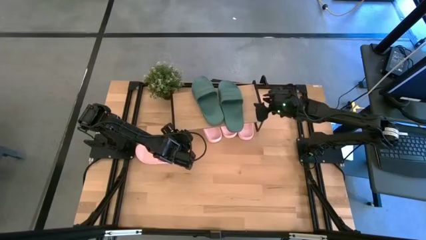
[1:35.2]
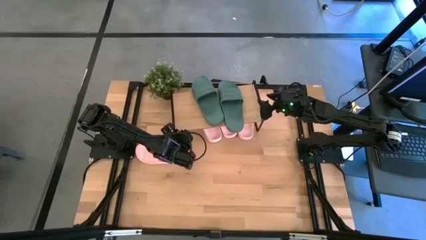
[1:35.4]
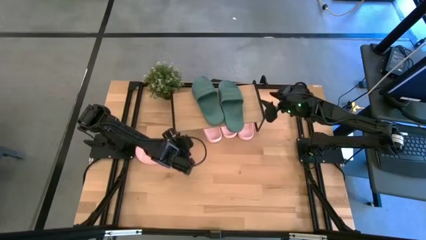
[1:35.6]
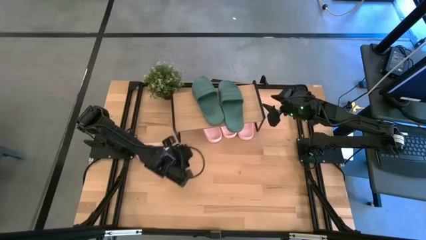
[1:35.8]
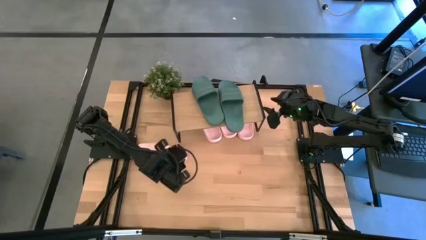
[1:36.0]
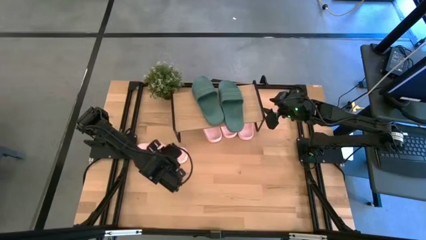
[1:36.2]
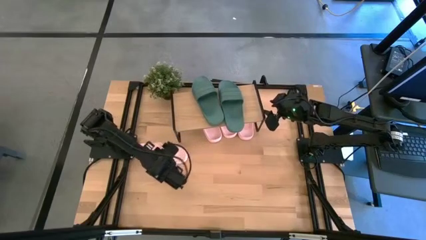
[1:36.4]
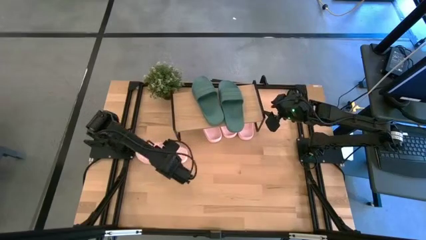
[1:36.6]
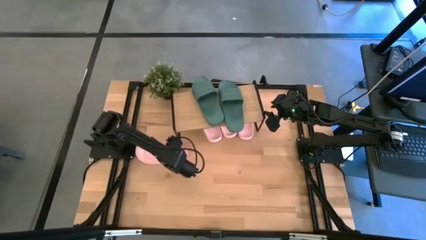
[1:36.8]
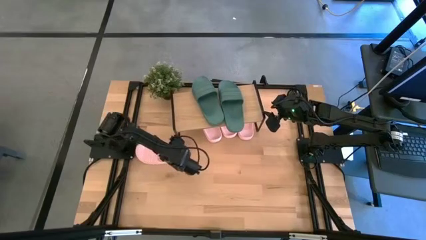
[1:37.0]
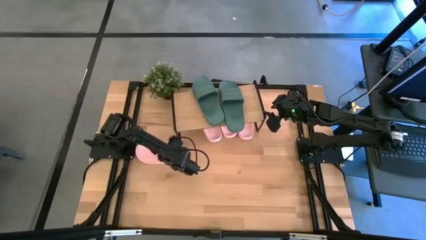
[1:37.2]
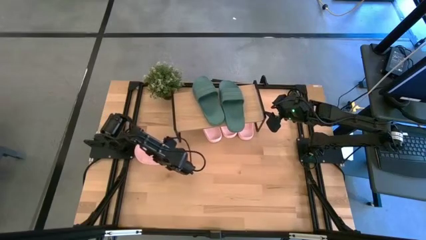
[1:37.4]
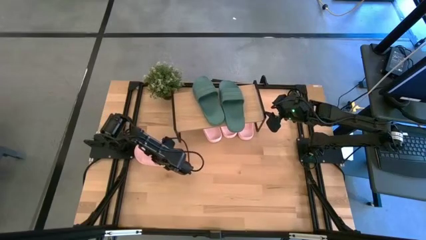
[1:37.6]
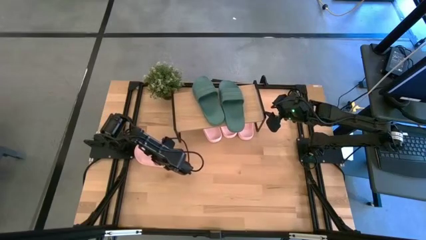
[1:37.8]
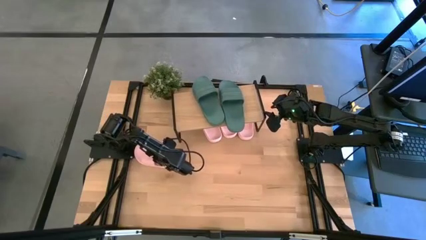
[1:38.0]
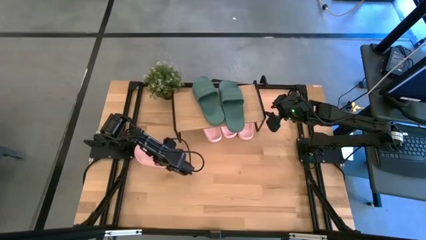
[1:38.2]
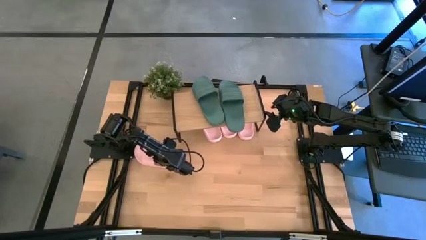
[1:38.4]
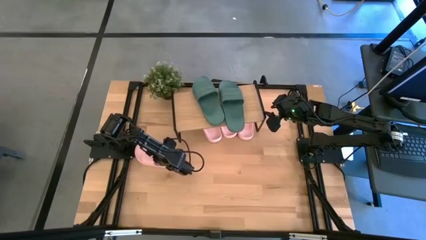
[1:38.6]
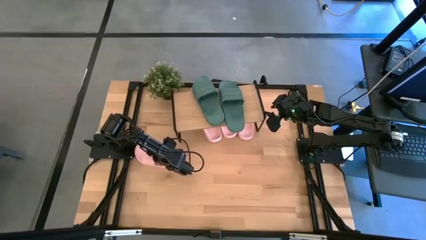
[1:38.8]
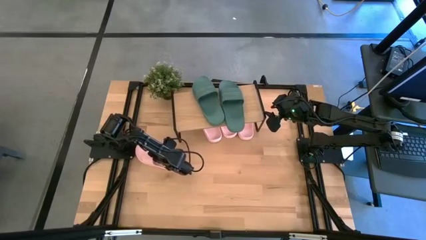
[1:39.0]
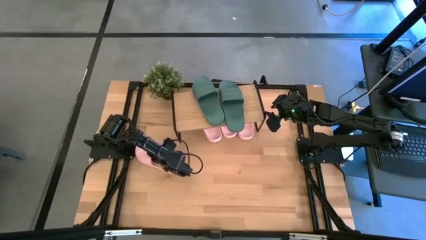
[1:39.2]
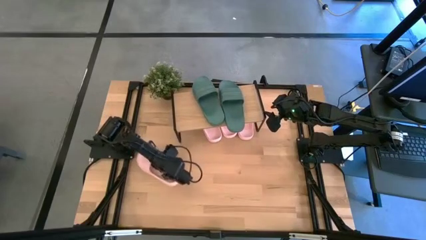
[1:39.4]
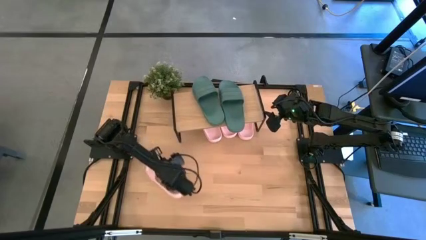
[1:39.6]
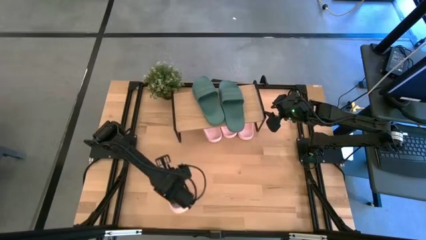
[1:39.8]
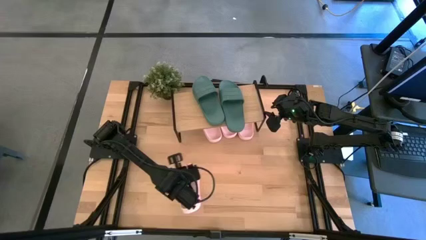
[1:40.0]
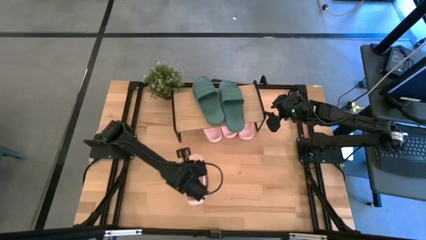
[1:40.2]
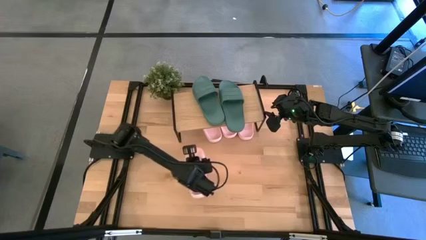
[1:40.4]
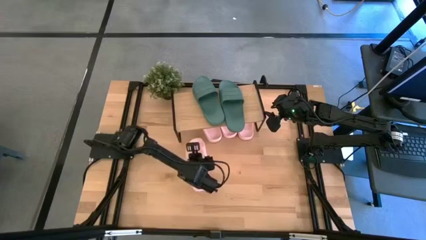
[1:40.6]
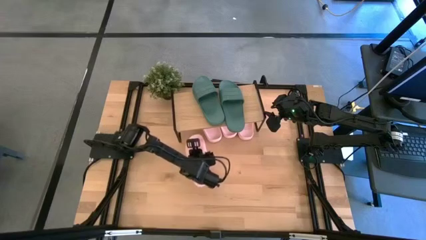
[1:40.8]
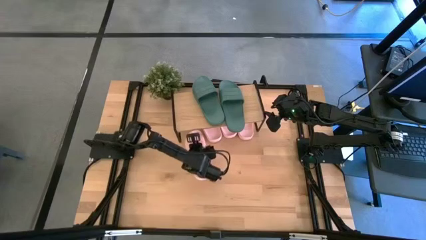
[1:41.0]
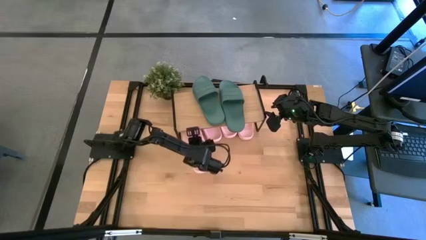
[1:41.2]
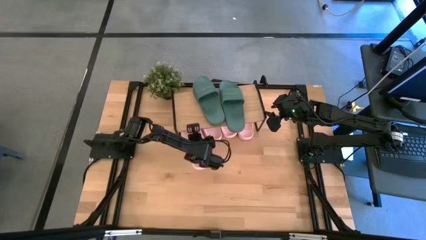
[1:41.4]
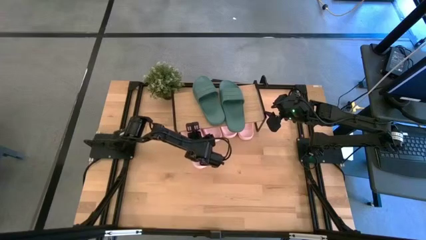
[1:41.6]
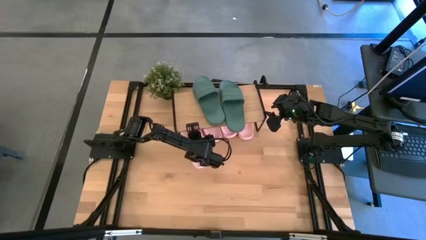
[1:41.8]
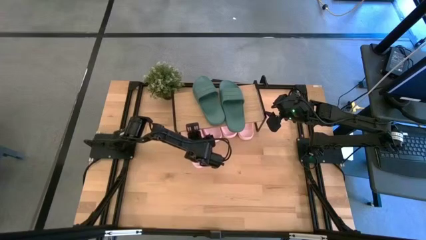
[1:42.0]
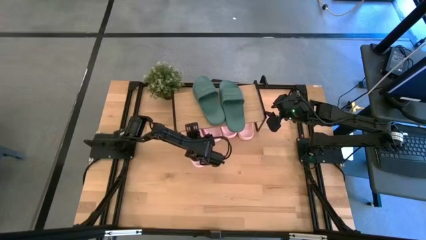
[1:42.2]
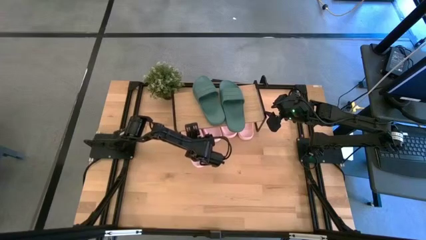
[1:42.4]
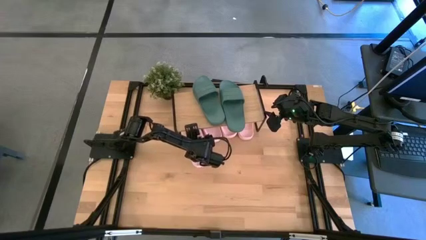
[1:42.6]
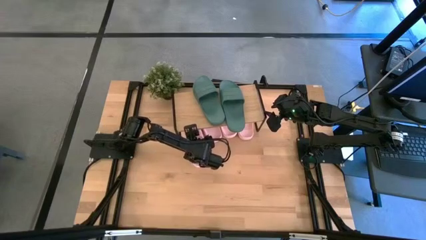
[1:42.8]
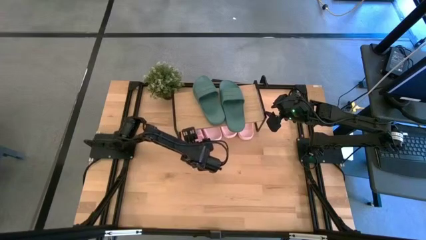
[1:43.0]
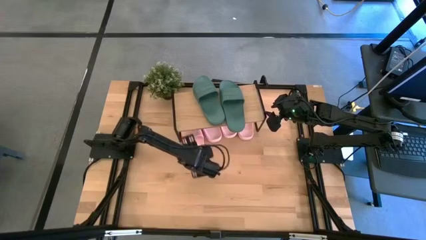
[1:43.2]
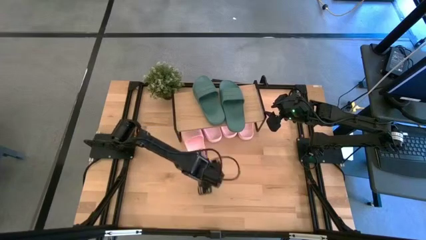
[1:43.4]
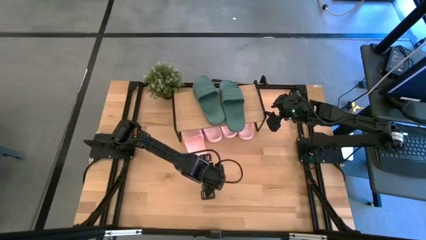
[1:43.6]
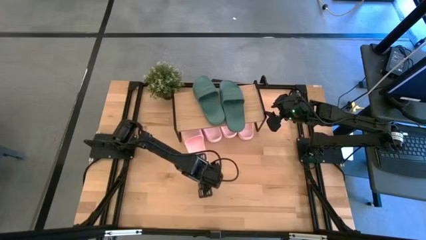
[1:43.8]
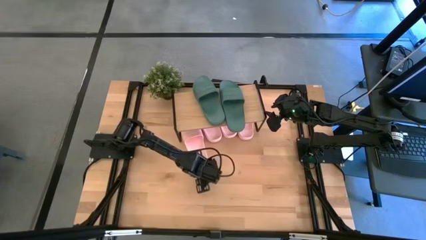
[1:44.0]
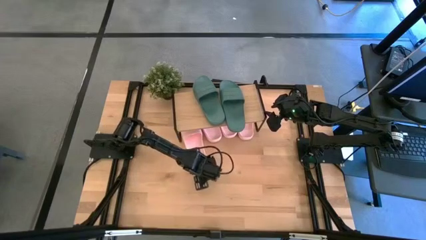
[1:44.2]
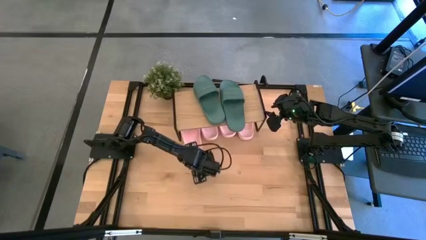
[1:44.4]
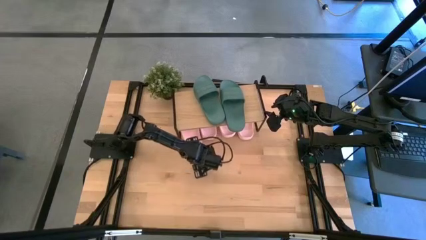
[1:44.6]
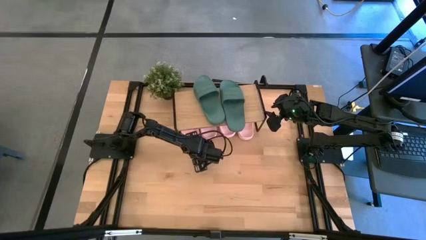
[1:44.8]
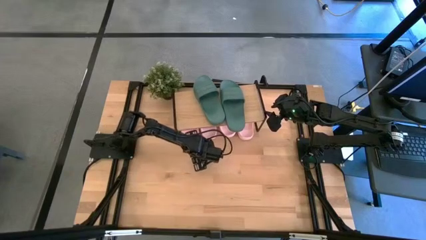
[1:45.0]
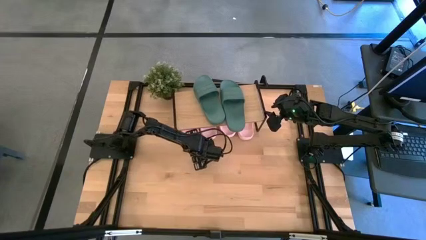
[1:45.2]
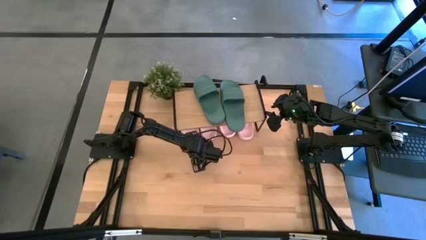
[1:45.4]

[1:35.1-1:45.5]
Task: Pick and place slides into the shelf
Put the pink slipper under the shelf

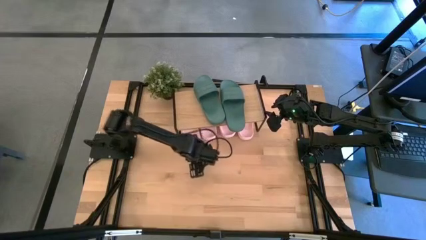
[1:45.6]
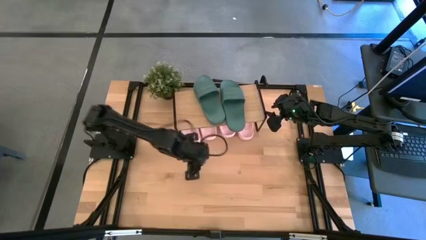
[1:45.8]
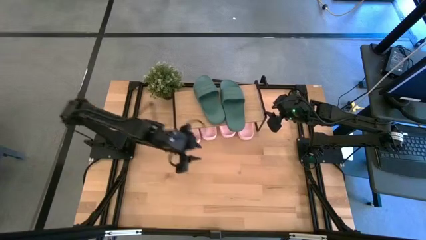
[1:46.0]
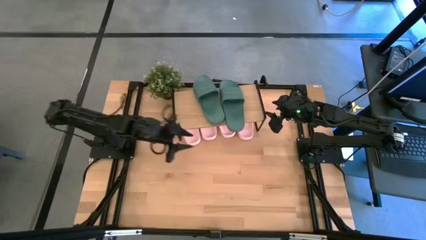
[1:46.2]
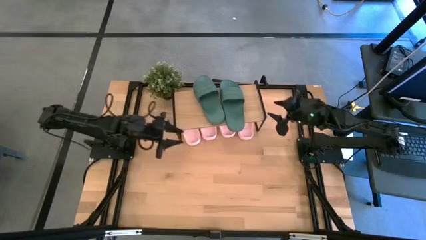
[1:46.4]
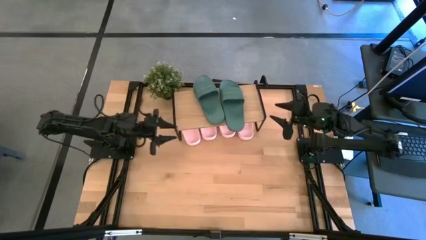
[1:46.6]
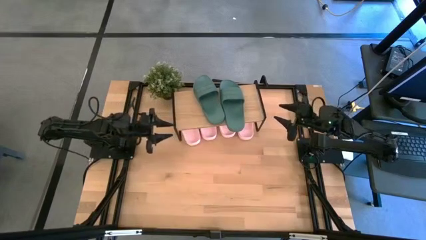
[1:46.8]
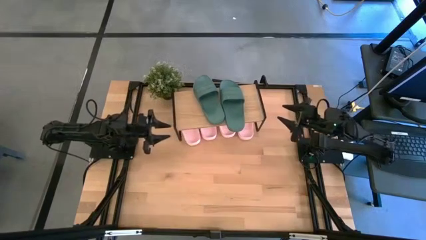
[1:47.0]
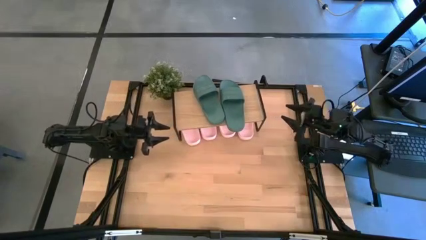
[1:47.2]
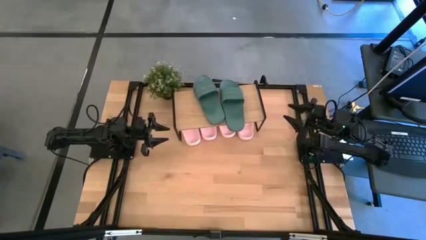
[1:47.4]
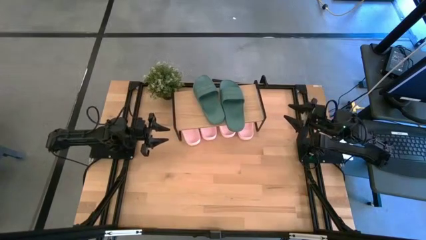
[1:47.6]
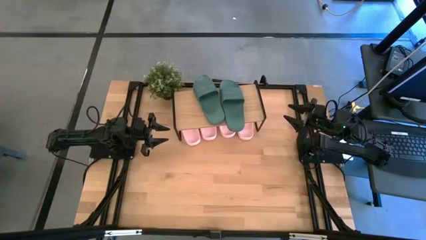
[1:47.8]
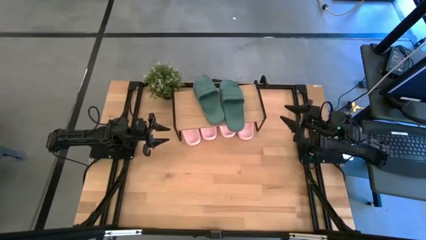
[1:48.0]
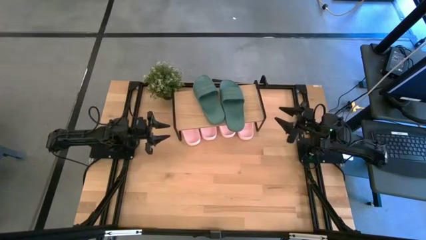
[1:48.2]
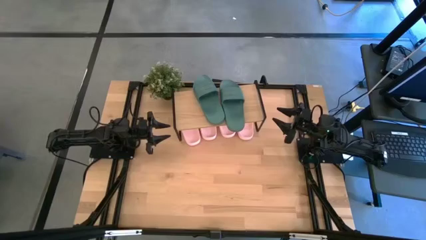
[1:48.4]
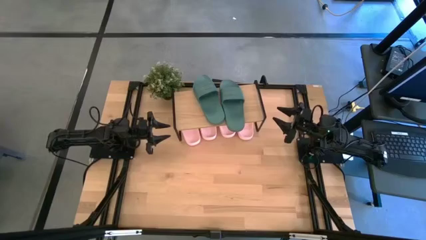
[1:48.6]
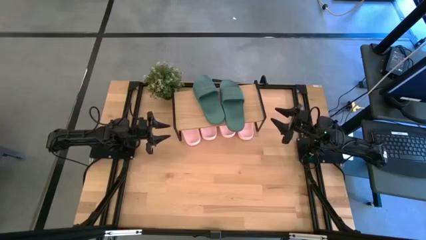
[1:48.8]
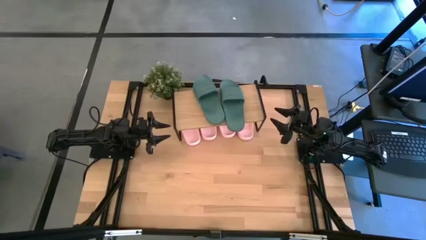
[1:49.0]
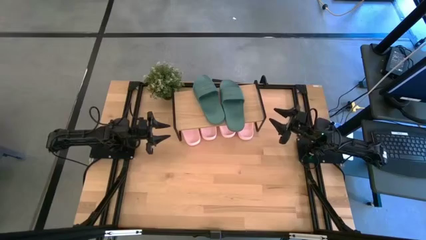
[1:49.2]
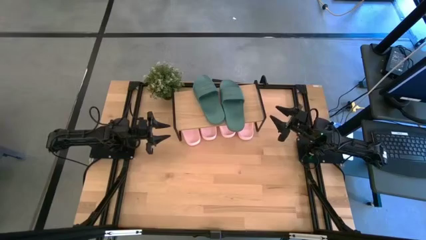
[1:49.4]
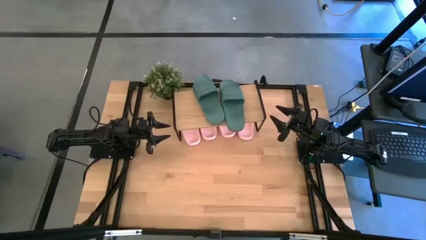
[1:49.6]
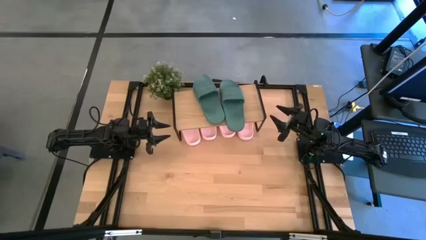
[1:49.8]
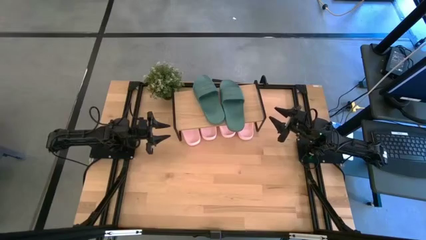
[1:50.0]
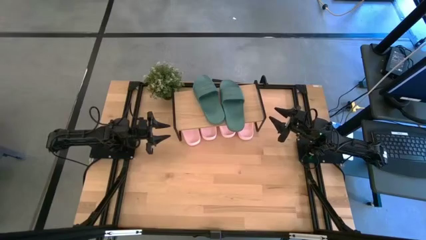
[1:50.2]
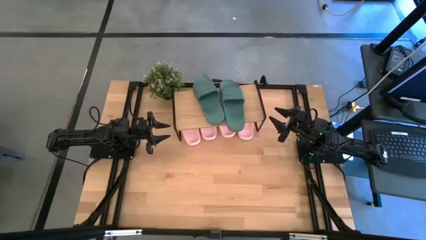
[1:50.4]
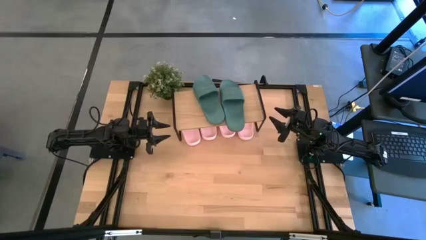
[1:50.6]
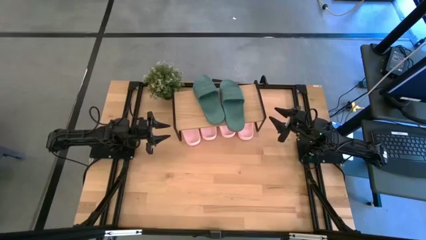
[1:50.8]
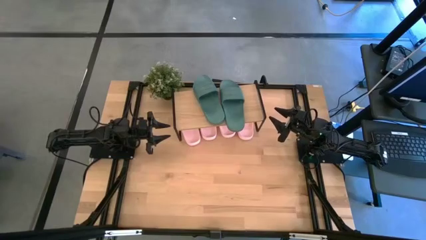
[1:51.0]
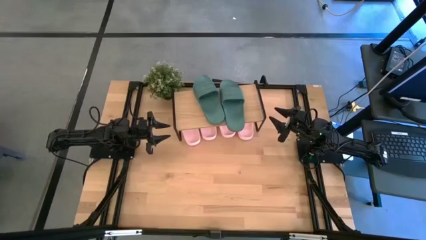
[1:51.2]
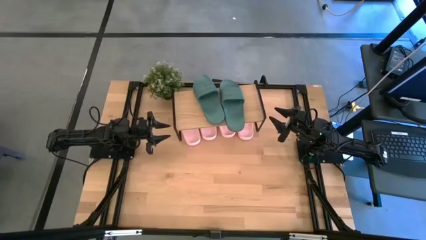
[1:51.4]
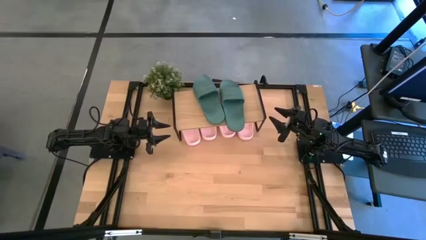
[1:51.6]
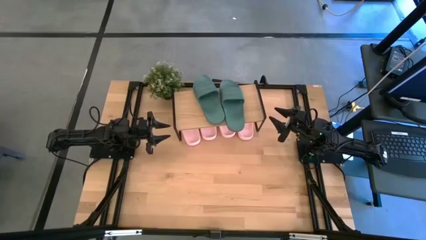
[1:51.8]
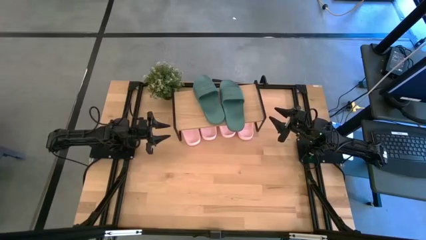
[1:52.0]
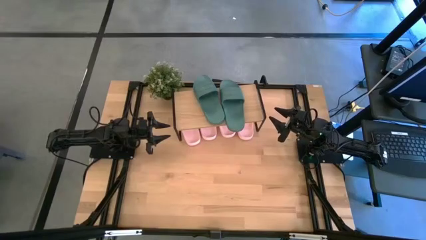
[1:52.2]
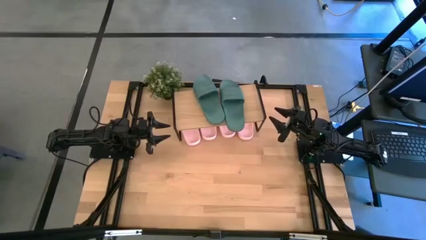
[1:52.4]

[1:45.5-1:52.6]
Return to Home Position
